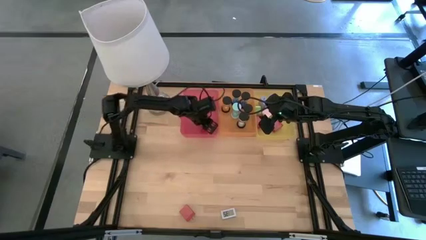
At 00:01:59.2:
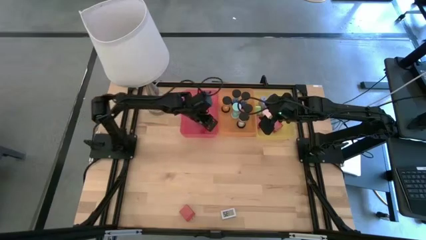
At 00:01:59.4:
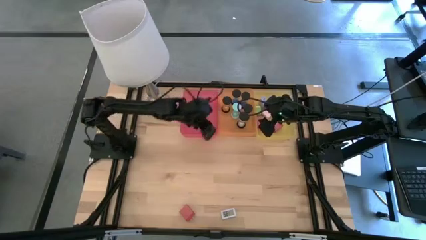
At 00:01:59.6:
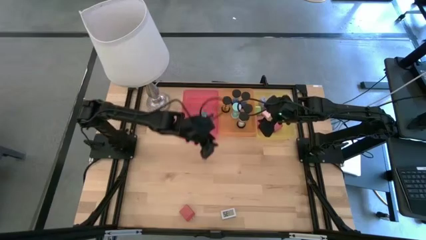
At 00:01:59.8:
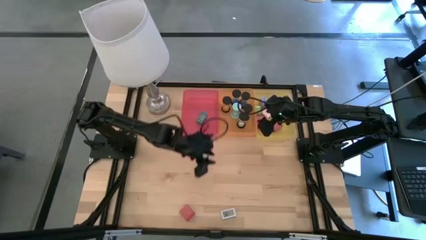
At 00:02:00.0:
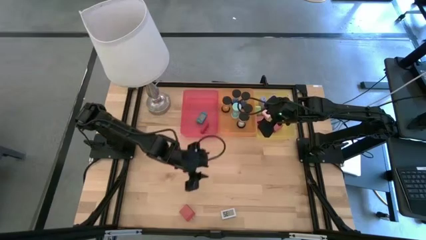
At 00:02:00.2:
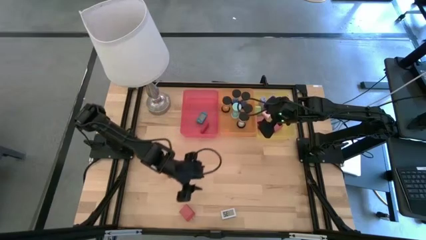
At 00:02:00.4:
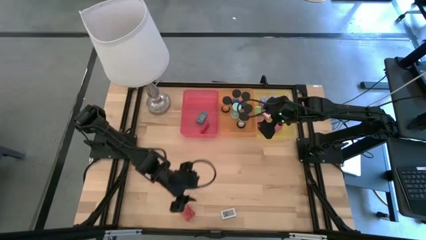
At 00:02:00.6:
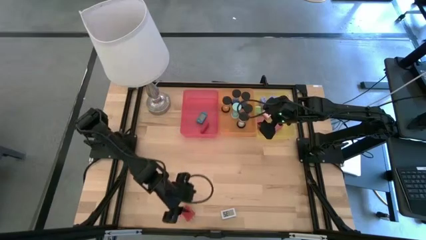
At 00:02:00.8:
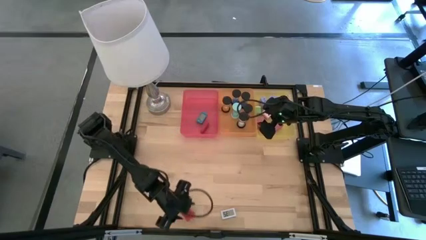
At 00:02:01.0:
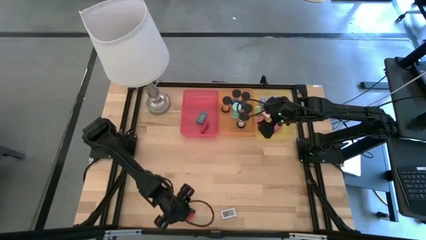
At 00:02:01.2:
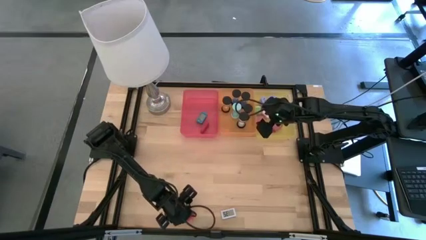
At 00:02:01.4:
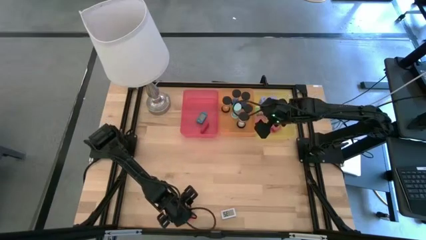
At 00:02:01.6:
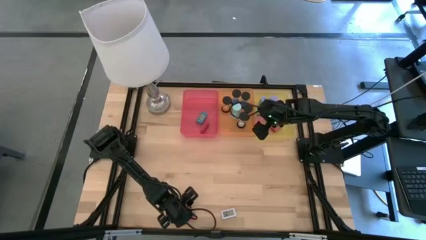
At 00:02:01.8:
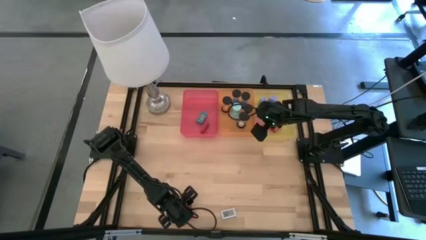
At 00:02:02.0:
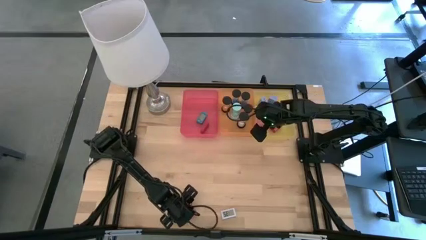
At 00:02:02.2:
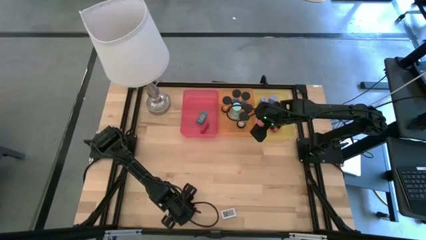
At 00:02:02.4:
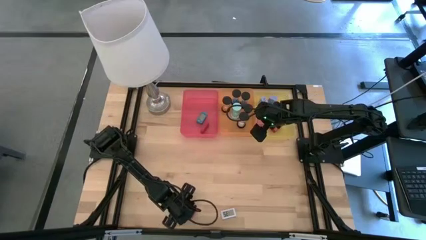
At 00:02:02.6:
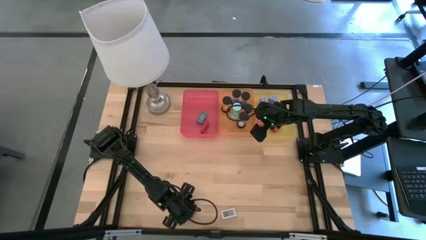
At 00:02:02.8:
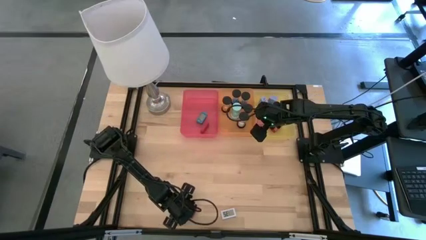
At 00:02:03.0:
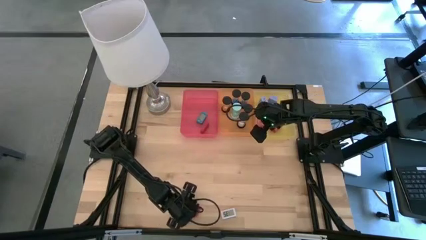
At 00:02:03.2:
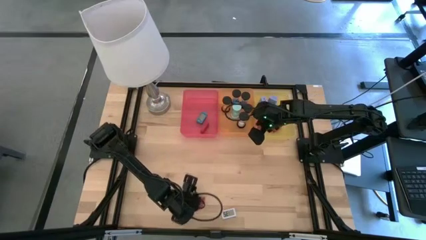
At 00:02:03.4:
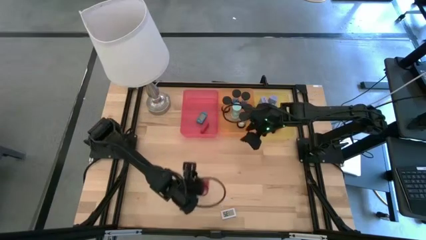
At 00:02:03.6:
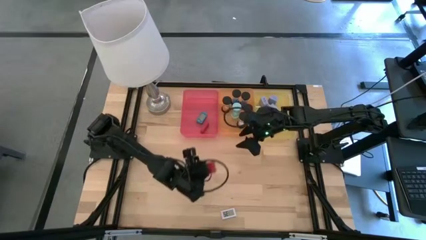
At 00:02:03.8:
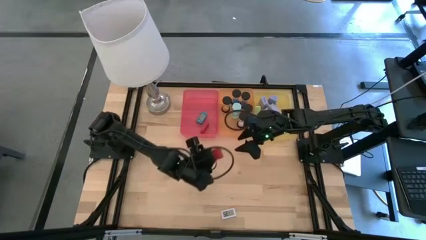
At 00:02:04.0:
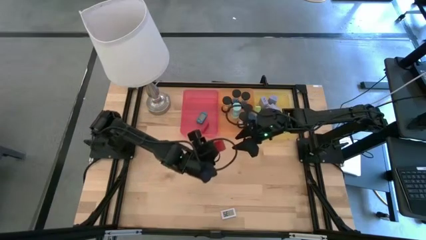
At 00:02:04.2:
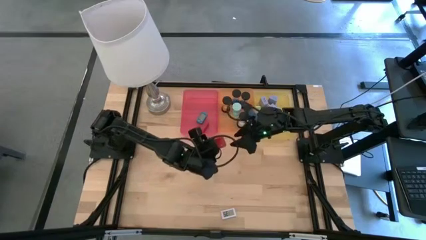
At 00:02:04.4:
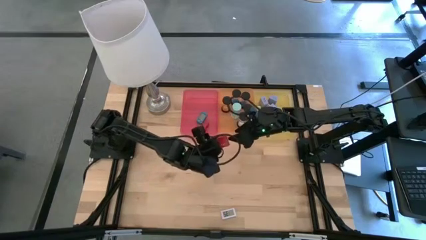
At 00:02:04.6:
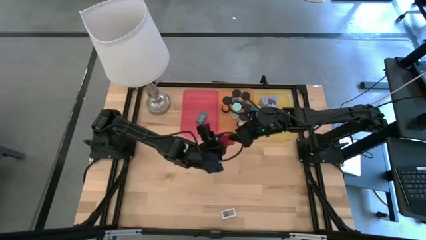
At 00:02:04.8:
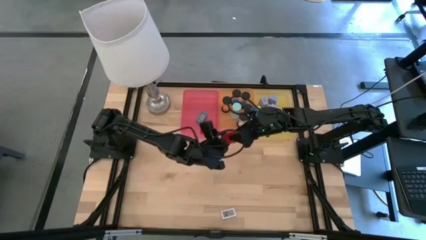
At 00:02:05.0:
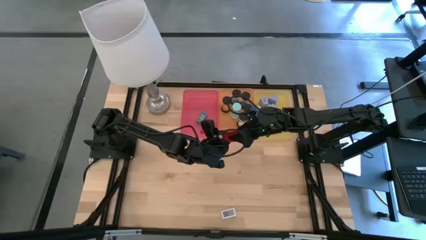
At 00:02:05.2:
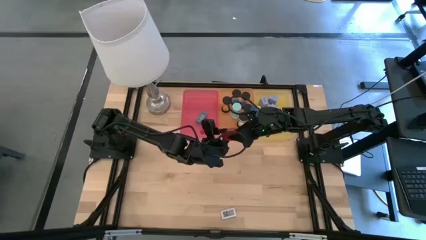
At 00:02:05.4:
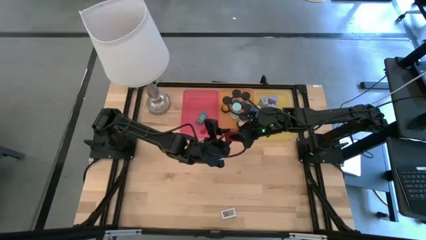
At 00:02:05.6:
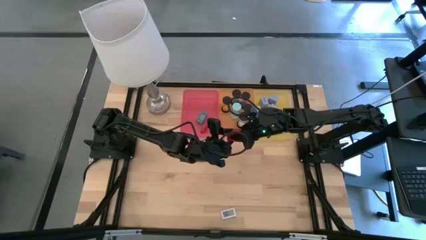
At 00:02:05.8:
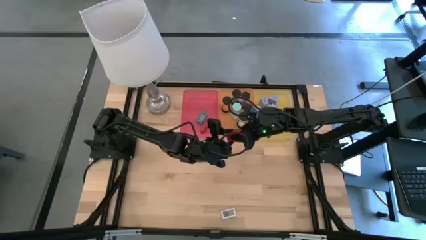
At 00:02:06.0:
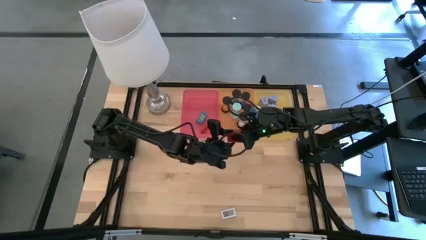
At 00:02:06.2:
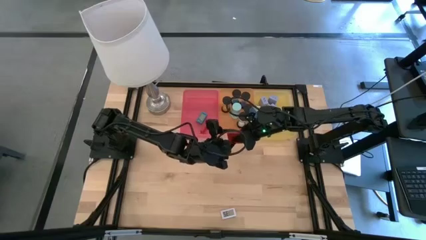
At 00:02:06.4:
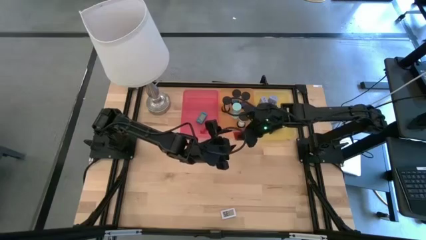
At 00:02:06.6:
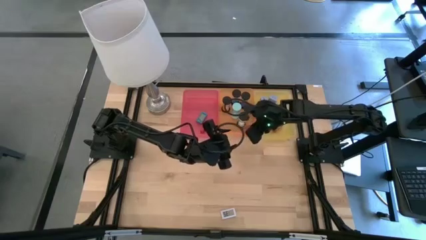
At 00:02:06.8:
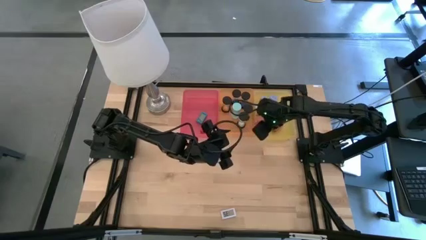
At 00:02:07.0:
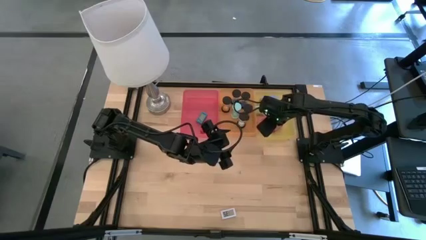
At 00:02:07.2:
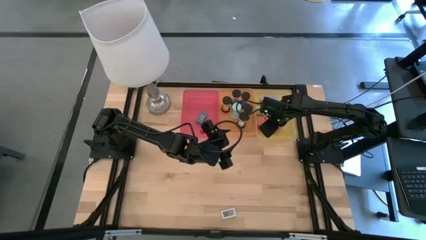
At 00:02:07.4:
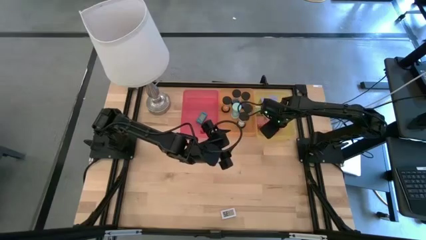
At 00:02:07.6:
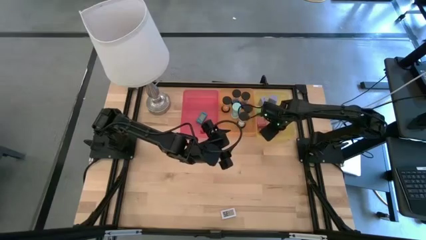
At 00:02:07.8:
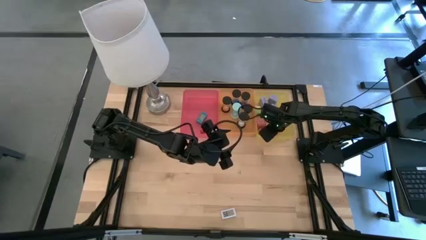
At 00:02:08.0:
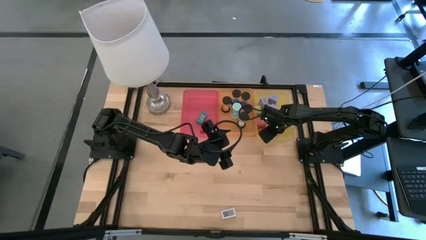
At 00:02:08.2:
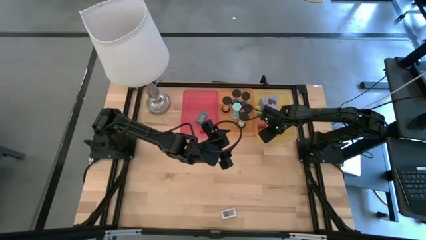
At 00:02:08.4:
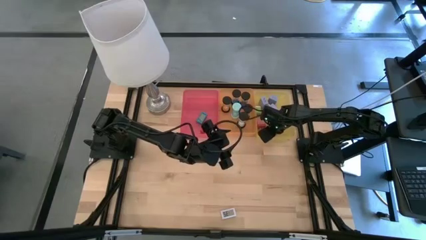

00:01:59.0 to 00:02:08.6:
Task: Pick & Place Office items
Put the red charger adapter into the yellow bin

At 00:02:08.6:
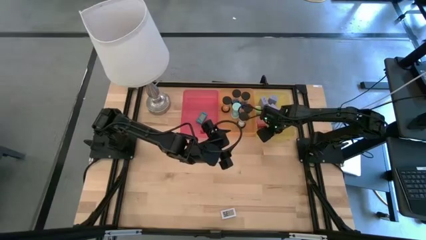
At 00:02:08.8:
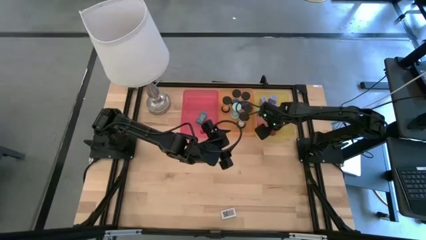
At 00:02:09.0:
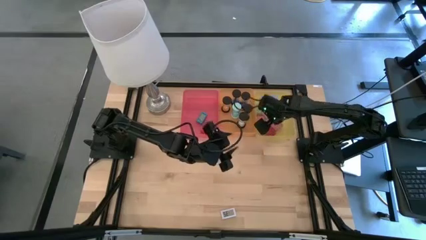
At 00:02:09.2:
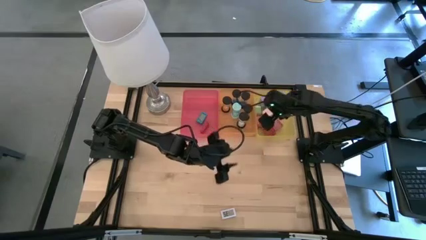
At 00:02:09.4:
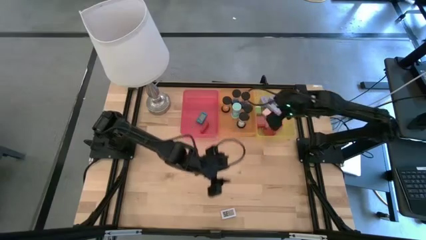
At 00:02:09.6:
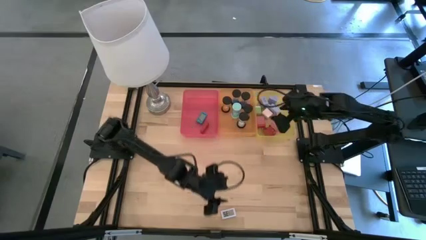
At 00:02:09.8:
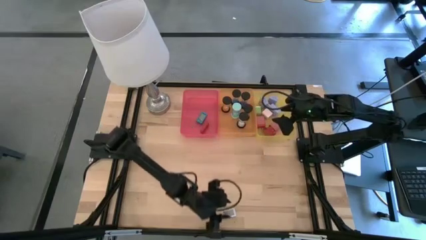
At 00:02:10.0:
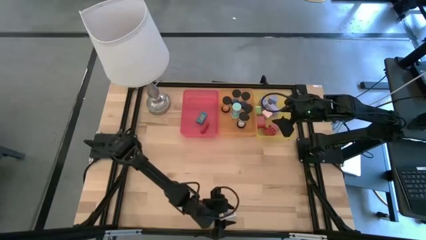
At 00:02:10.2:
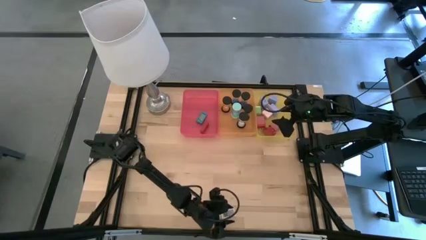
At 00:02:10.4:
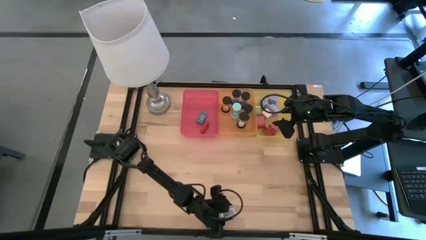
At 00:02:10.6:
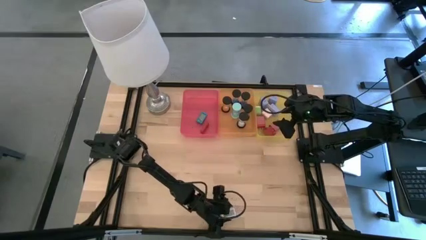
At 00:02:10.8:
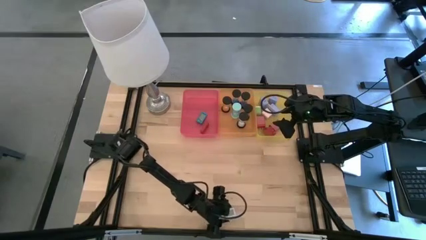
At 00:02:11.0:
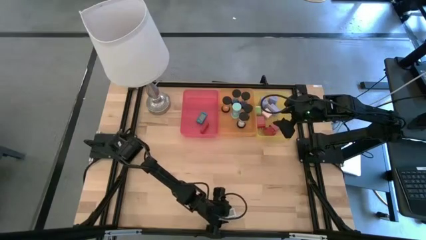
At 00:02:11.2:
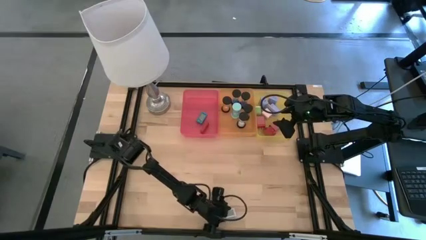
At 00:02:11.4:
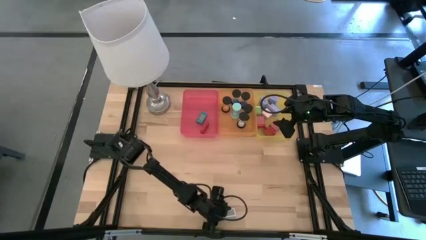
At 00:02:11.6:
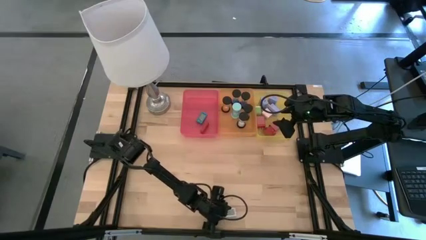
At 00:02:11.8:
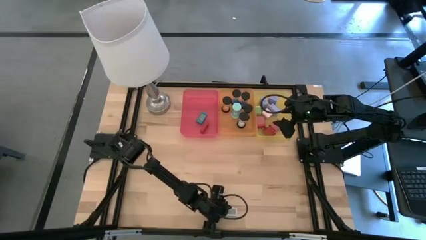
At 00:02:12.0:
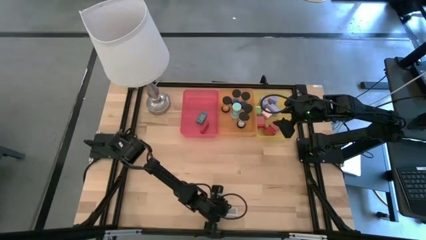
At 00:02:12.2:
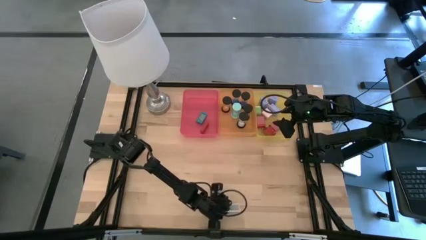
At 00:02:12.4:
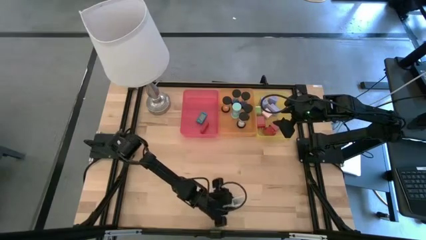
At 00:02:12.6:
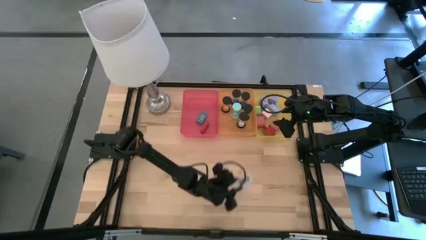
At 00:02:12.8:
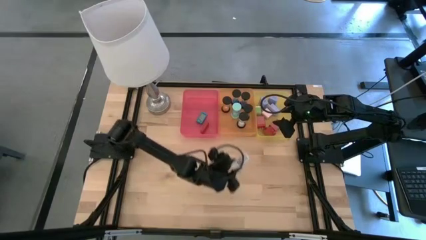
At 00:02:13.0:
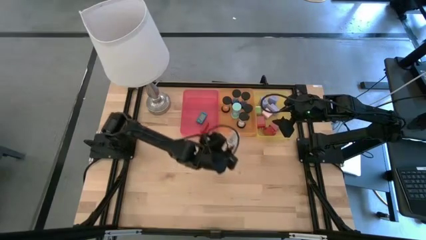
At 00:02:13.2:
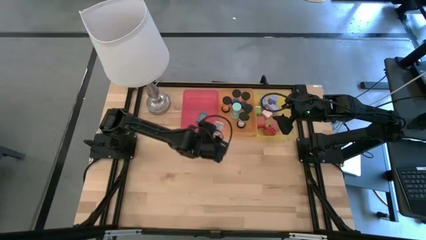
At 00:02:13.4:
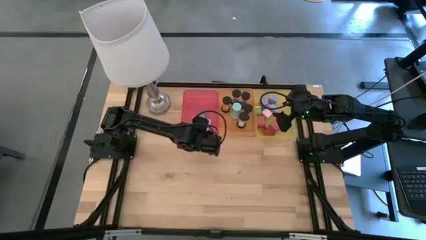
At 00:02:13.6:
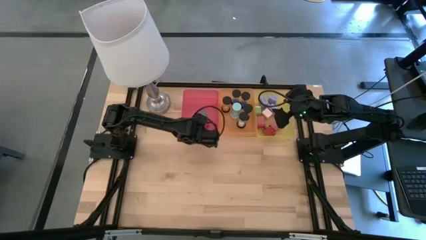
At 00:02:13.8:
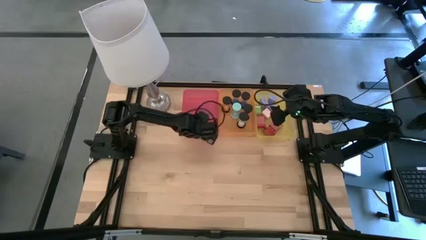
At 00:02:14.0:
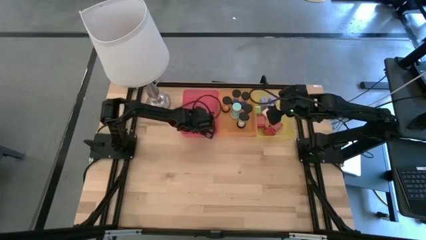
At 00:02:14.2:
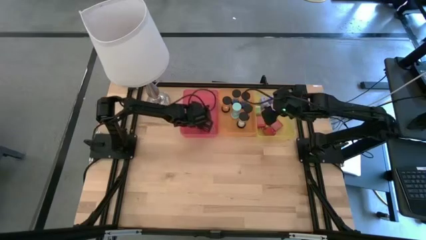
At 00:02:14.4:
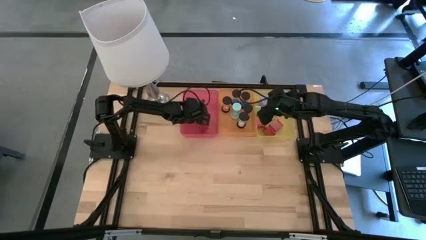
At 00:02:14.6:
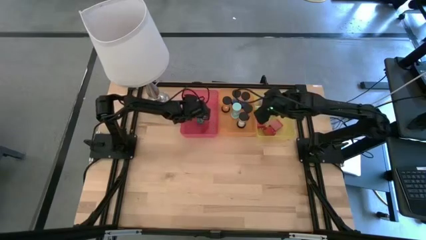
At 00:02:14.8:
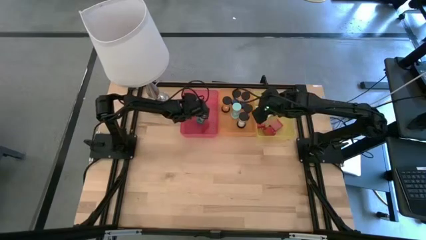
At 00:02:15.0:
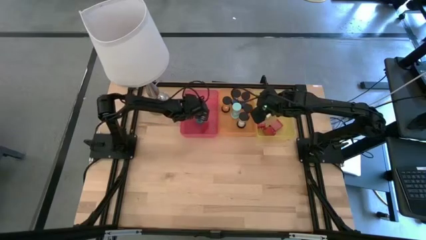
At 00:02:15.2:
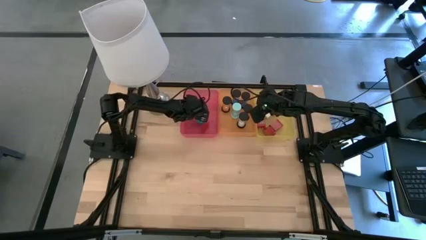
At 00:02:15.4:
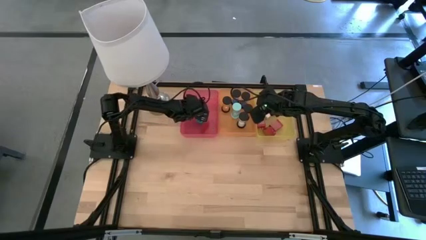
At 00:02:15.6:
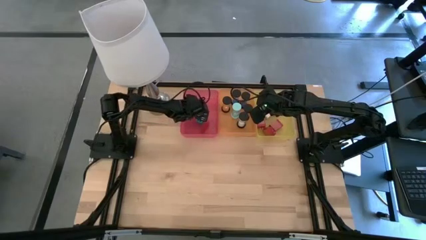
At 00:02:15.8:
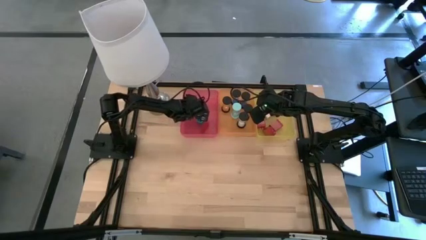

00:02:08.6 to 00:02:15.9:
Put the white digital clock into the pink bin
